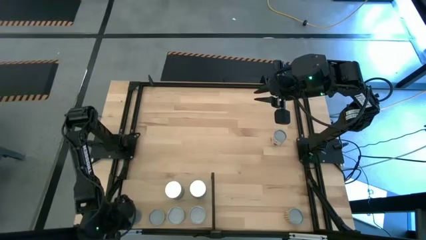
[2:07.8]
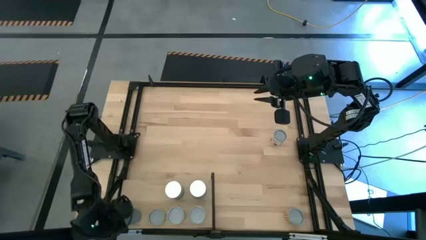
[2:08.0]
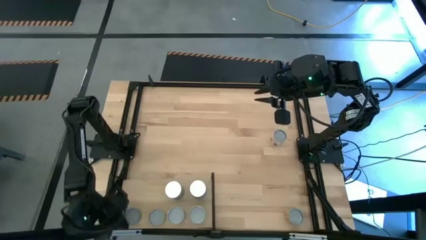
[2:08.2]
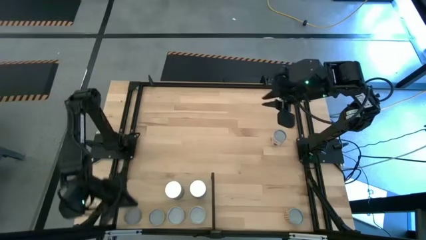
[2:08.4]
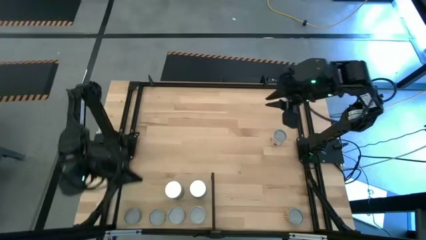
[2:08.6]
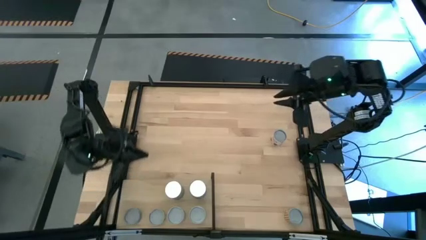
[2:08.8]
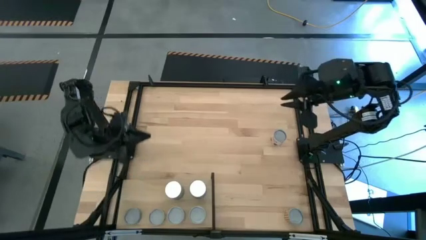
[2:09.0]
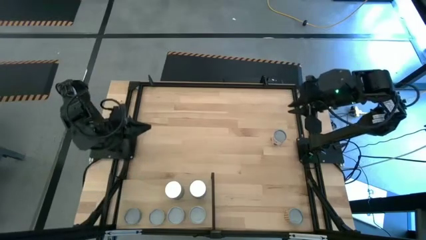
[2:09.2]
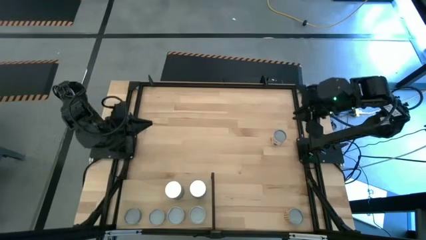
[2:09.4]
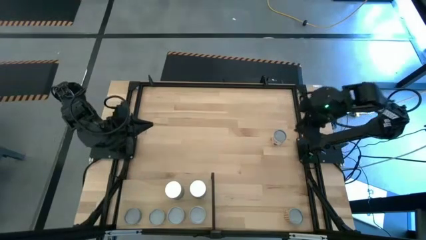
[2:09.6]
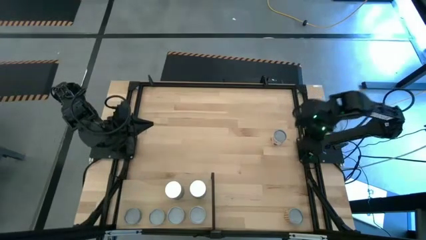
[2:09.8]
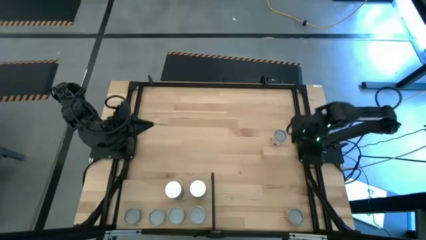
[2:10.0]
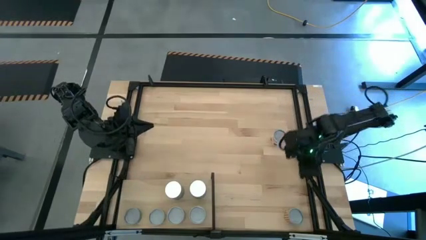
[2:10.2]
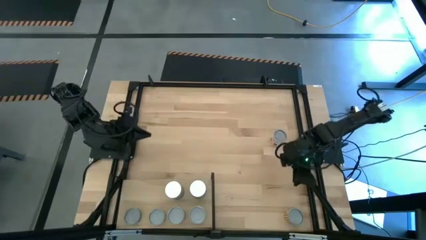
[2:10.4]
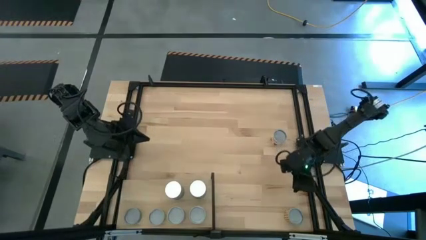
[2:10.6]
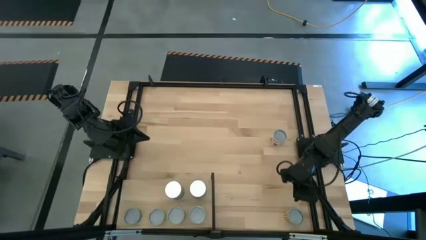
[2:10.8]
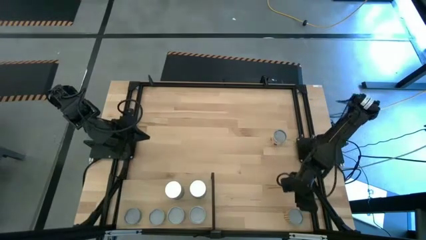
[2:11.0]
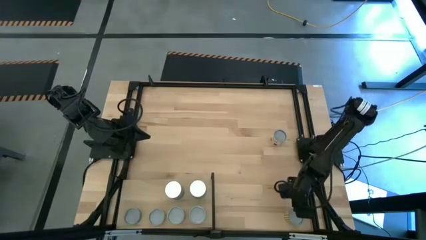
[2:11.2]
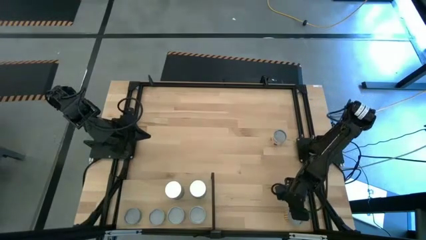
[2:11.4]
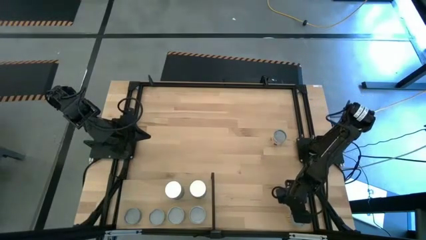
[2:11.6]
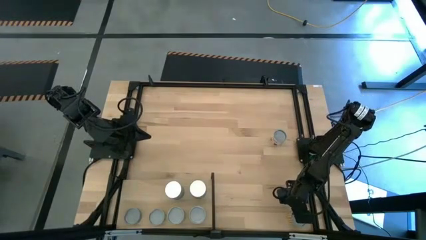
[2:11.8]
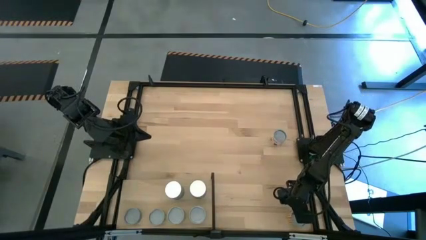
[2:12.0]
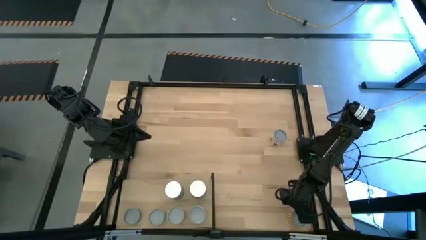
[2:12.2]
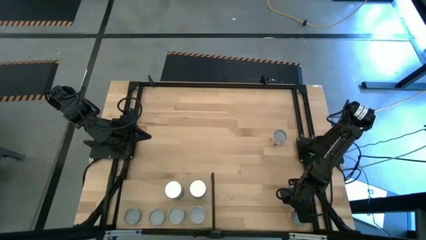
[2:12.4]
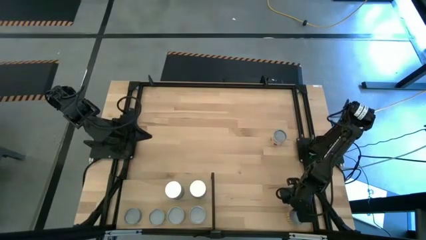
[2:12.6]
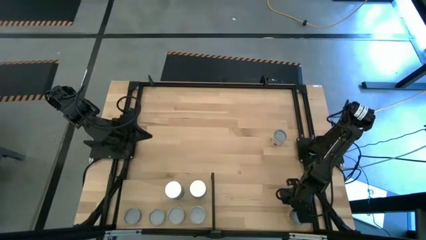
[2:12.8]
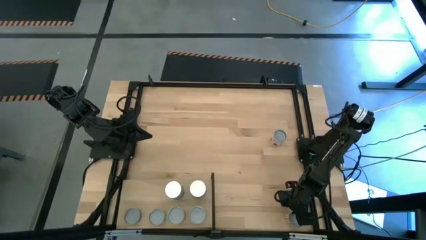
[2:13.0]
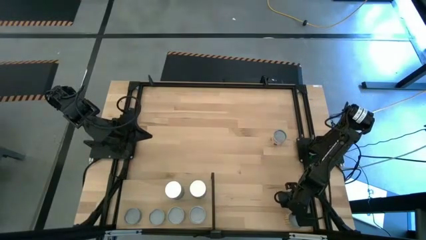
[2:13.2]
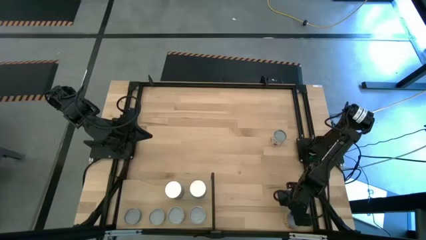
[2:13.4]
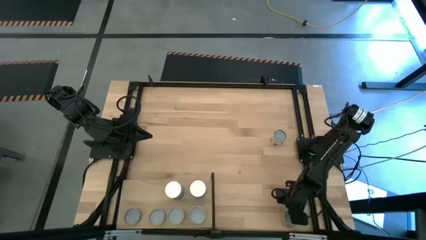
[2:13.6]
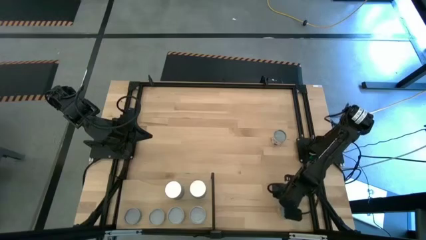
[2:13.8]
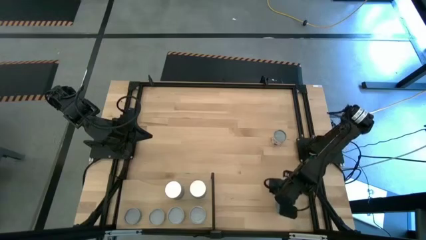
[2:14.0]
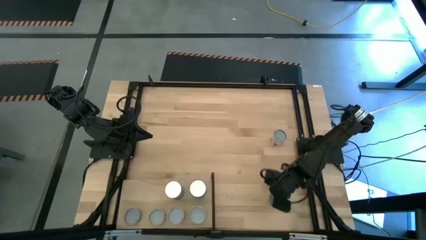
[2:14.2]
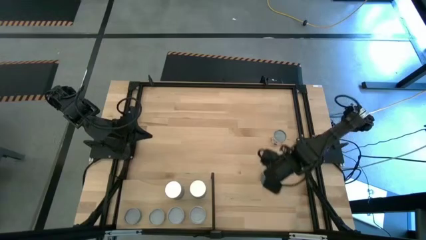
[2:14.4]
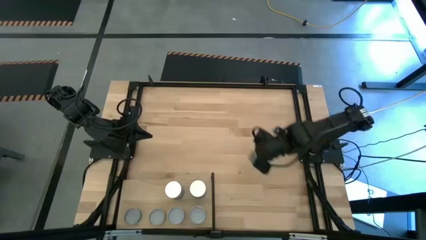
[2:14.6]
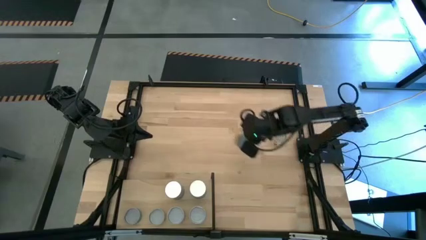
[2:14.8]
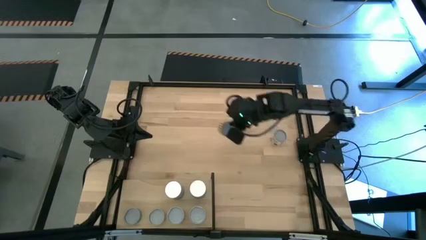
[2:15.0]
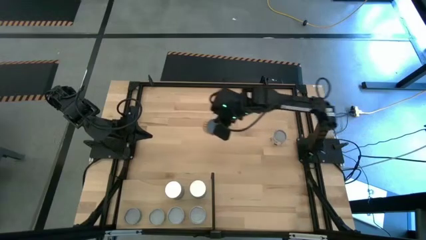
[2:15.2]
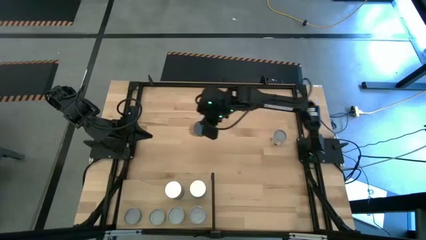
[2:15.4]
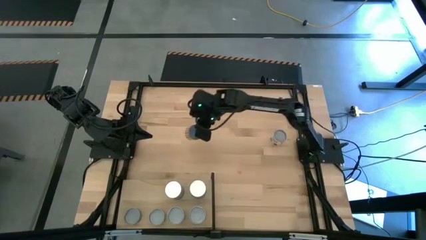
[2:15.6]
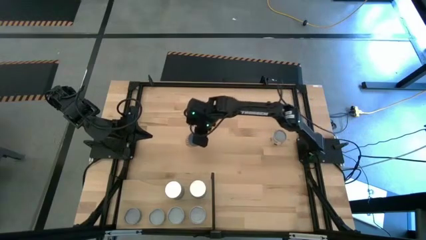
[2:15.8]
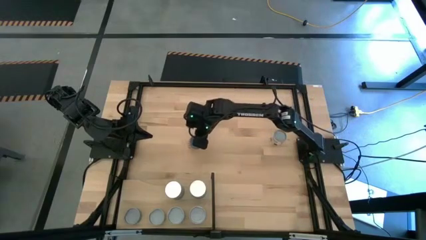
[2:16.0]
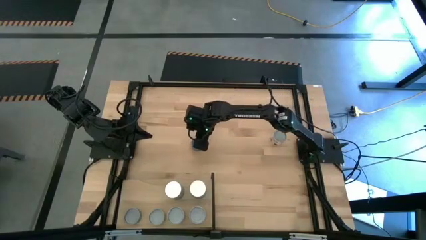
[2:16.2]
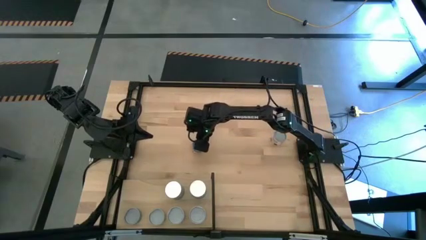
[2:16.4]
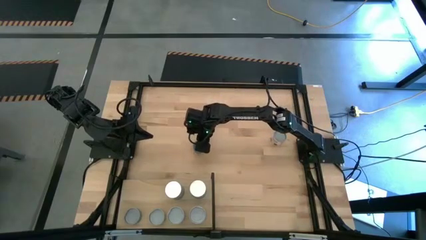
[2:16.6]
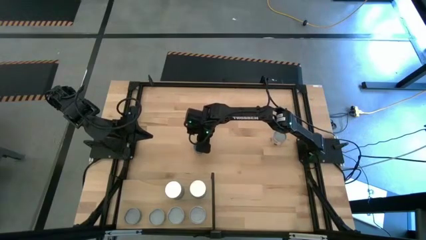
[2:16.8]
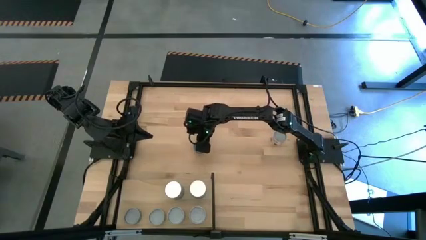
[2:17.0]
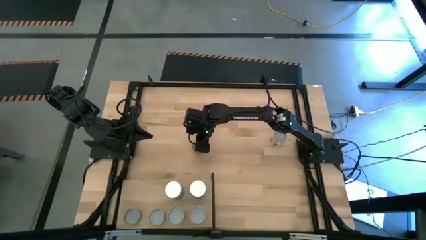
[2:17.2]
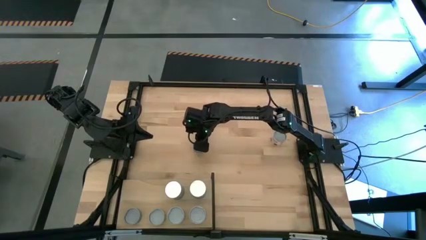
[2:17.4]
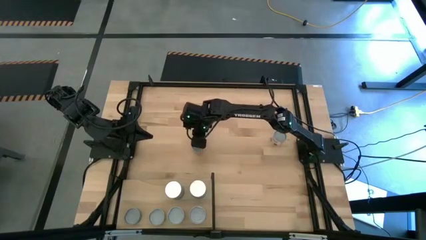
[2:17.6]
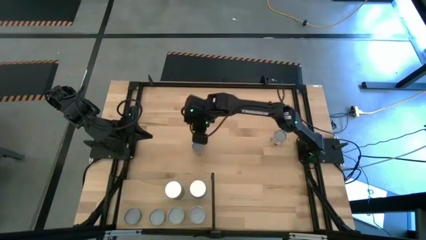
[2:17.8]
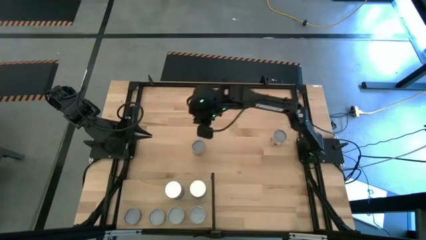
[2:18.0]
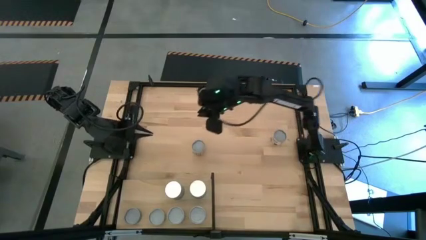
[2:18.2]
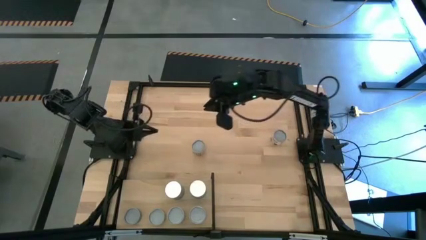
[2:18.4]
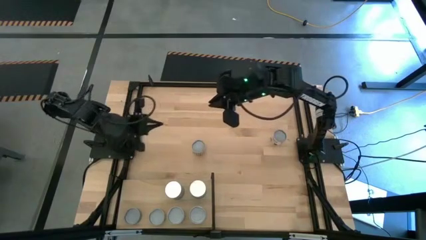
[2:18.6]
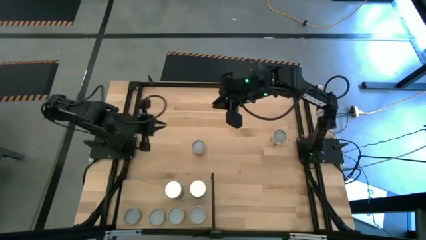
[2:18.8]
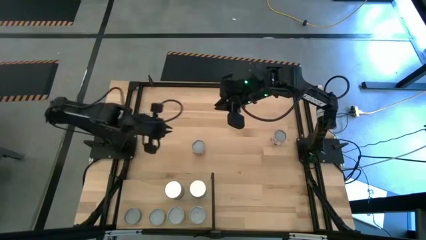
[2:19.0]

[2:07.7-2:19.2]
Task: Pick and place cans onto a shelf
Put the canned black beans on the shelf

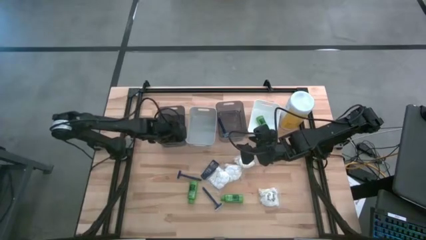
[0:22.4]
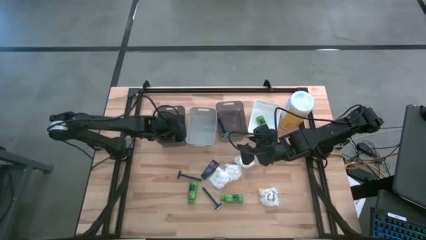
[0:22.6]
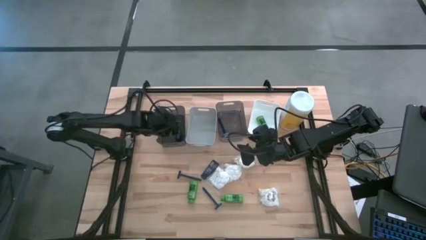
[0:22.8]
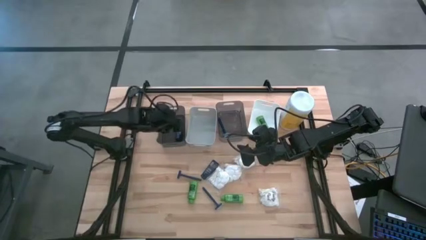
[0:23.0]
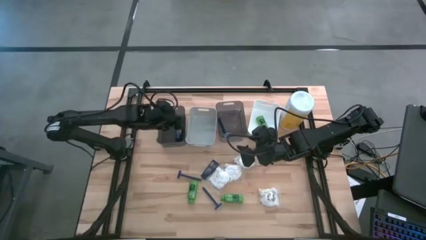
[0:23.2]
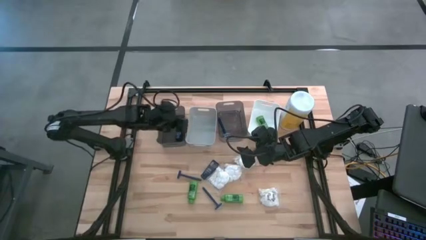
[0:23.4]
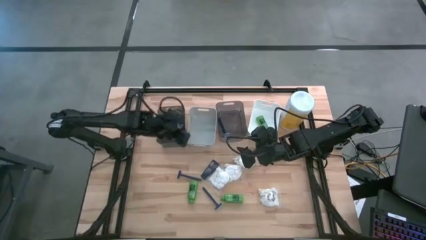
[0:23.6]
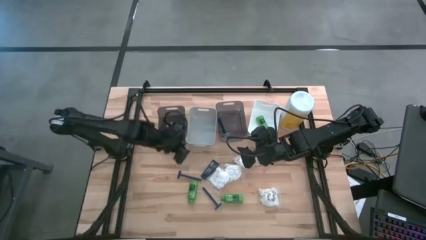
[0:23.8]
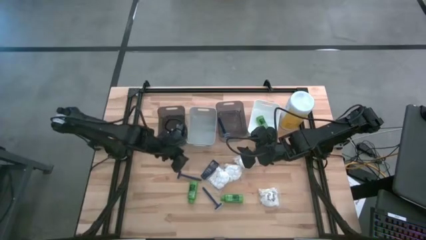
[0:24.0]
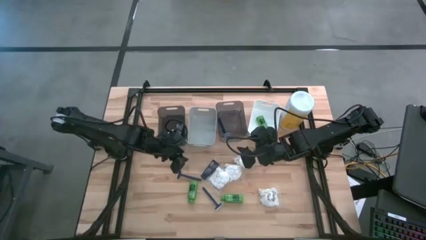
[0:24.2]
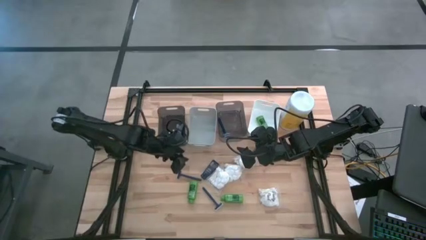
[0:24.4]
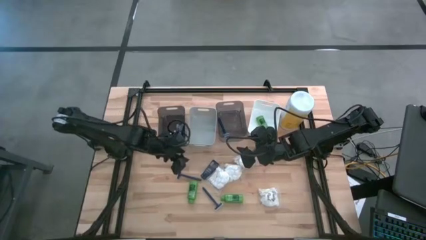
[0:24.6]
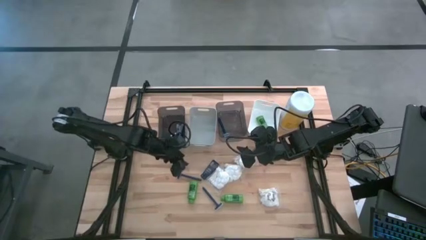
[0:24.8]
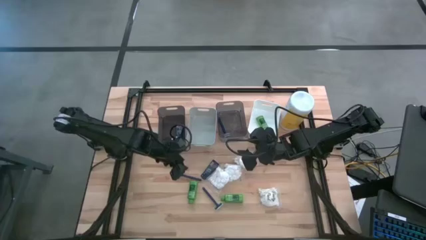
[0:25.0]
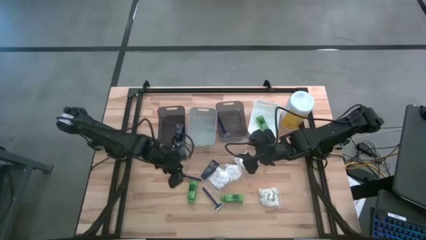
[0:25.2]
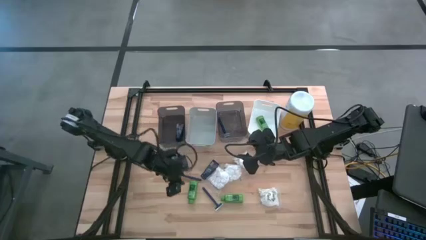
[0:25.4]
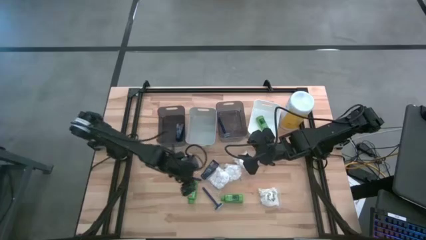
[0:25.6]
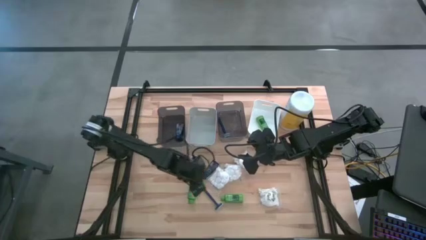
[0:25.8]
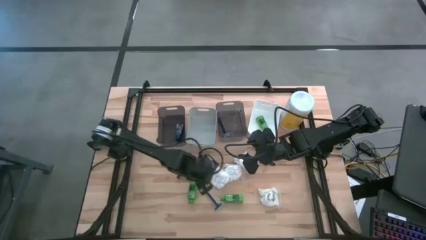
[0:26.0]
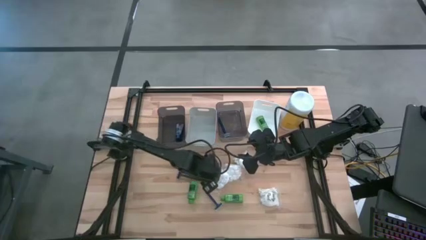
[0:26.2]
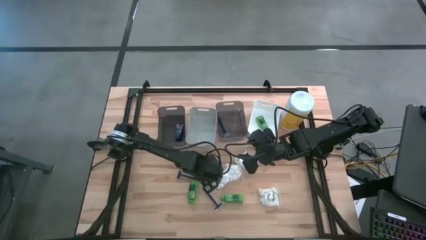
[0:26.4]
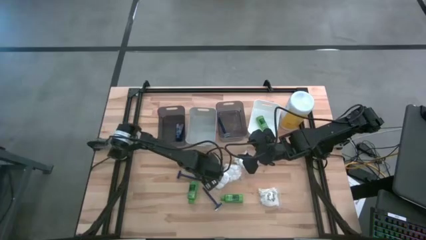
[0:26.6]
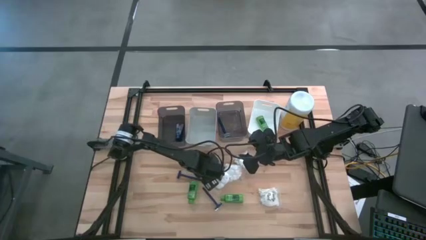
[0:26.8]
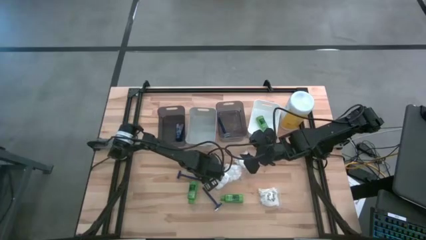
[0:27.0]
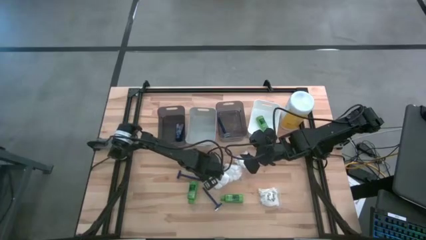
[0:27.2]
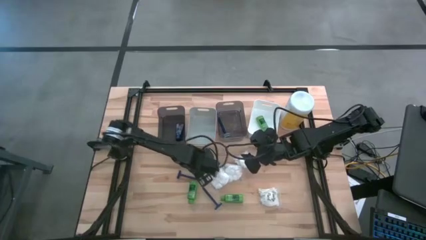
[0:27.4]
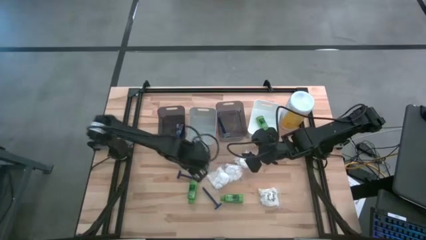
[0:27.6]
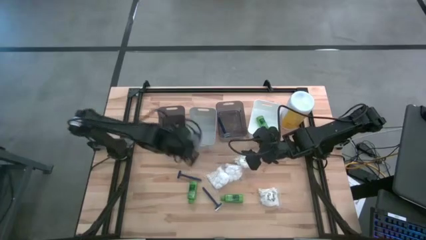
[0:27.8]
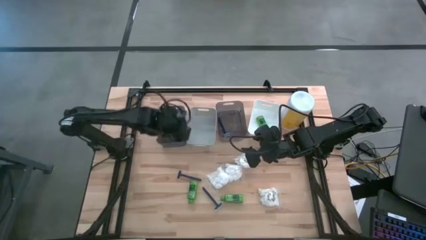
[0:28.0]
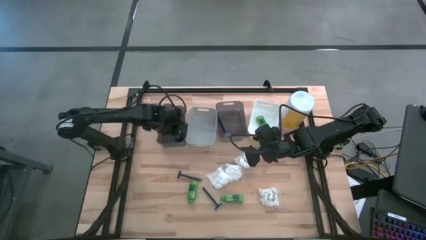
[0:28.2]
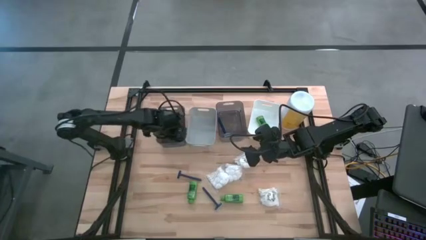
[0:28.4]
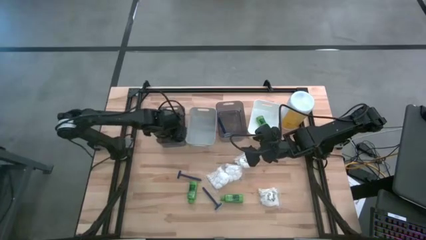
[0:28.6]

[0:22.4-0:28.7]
Task: Pick & Place Travel size toiletries
Put the blue shave cream into the left black bin
